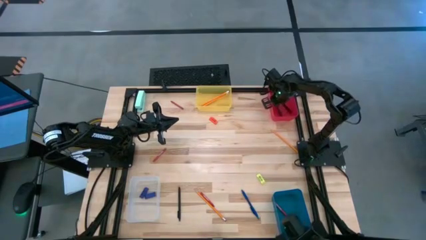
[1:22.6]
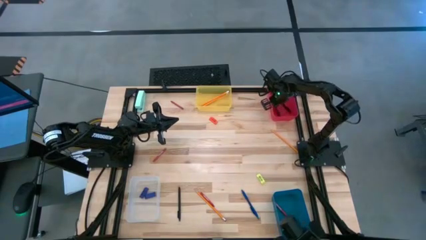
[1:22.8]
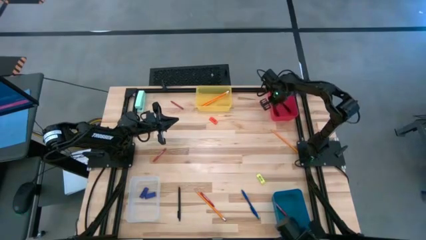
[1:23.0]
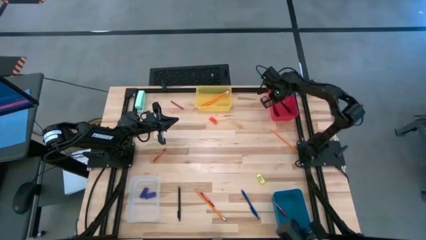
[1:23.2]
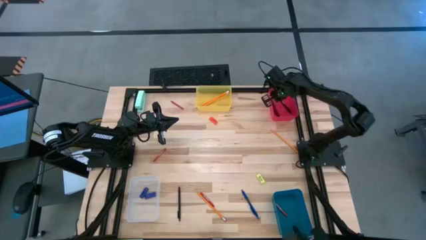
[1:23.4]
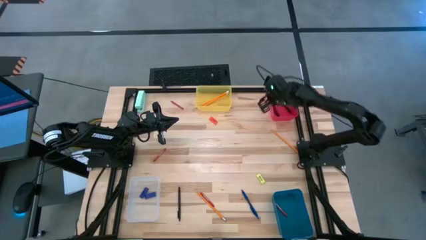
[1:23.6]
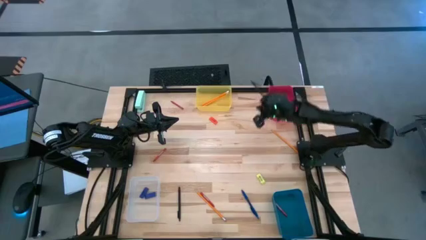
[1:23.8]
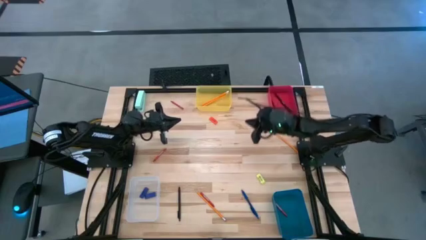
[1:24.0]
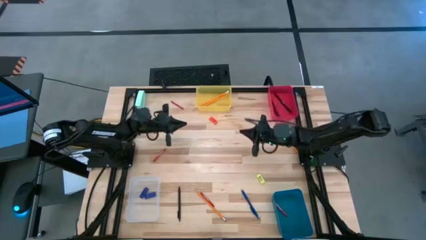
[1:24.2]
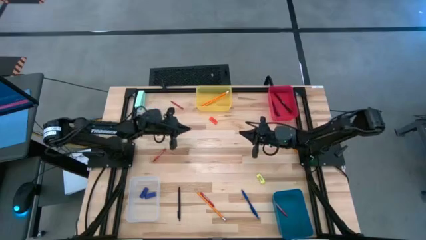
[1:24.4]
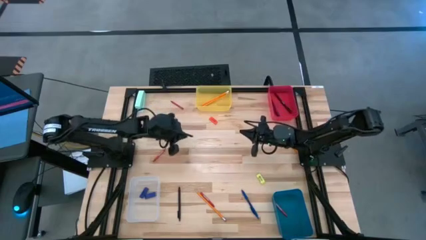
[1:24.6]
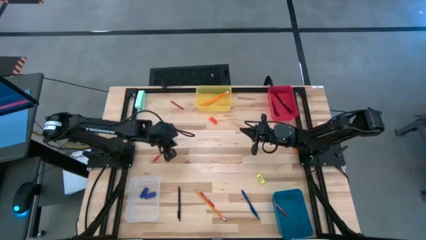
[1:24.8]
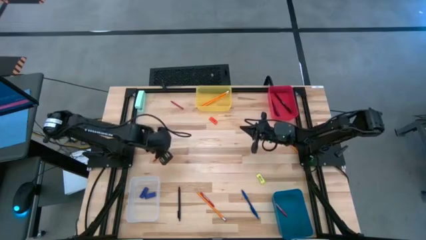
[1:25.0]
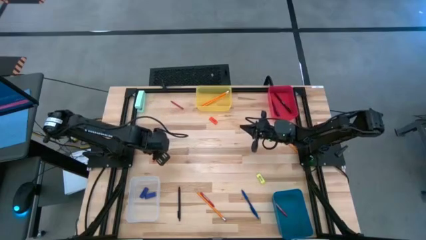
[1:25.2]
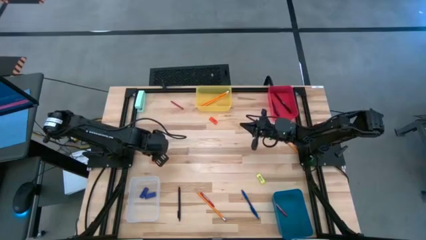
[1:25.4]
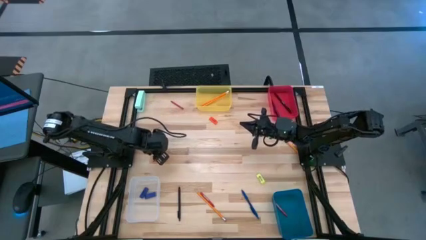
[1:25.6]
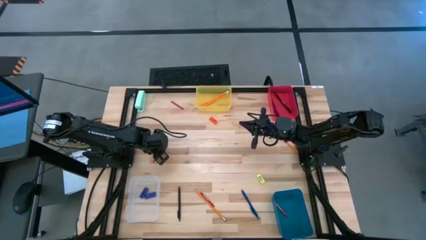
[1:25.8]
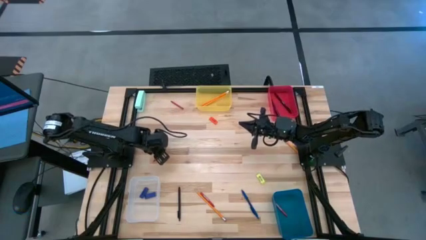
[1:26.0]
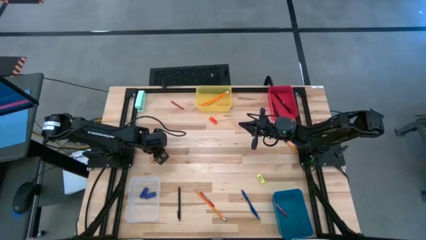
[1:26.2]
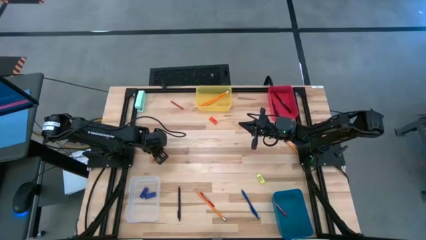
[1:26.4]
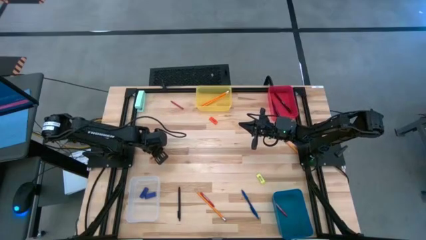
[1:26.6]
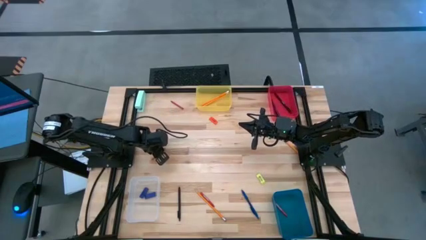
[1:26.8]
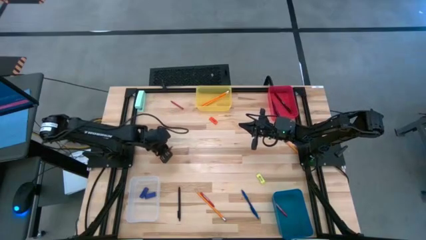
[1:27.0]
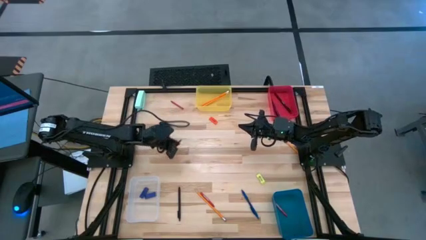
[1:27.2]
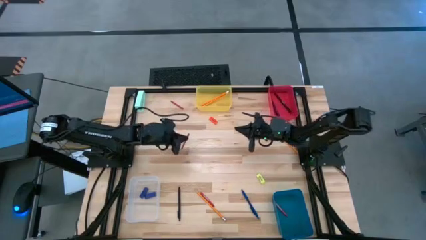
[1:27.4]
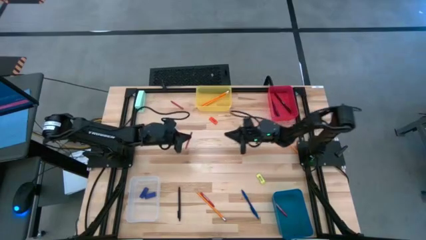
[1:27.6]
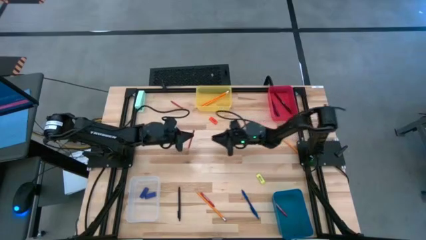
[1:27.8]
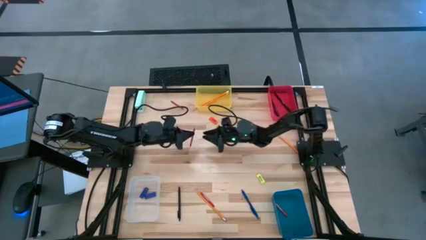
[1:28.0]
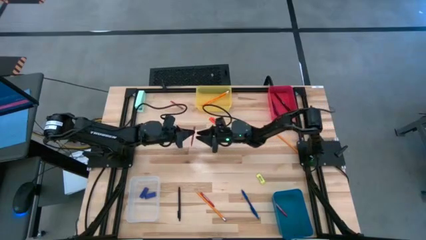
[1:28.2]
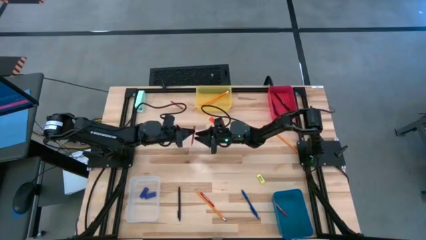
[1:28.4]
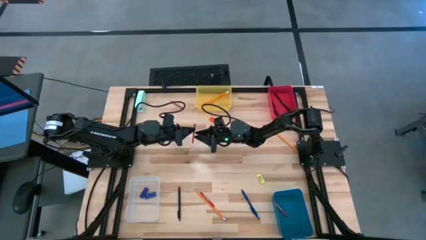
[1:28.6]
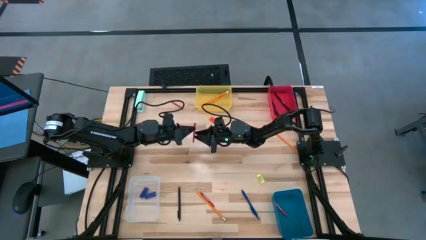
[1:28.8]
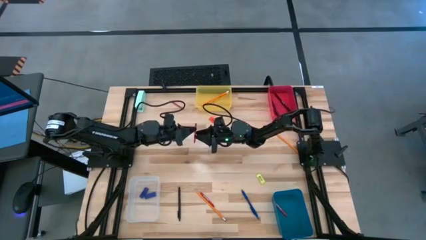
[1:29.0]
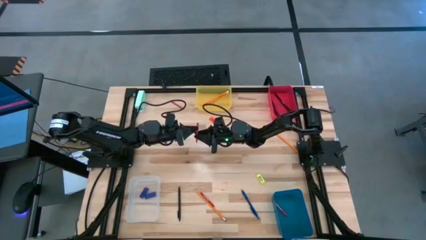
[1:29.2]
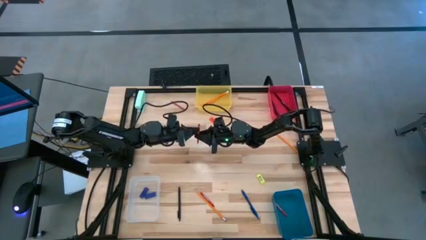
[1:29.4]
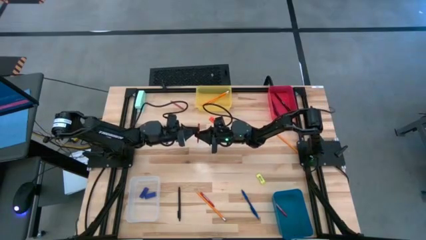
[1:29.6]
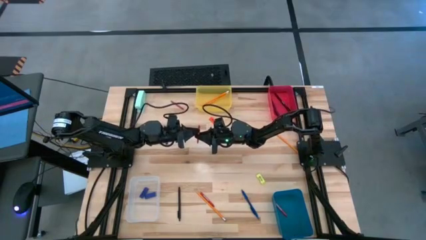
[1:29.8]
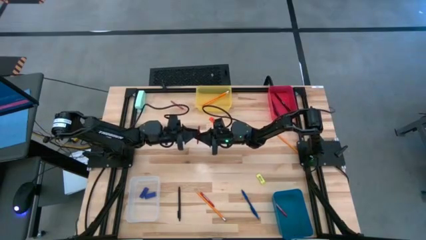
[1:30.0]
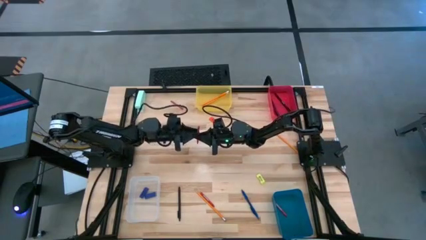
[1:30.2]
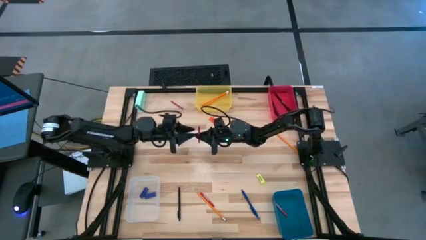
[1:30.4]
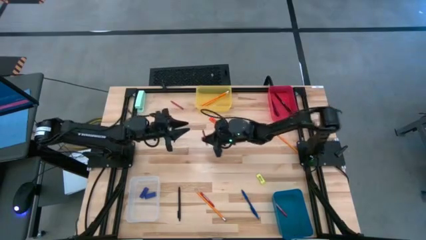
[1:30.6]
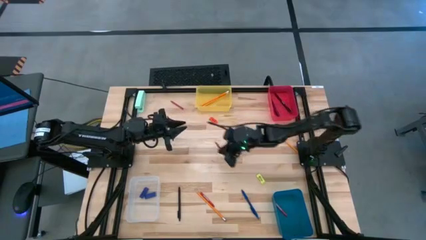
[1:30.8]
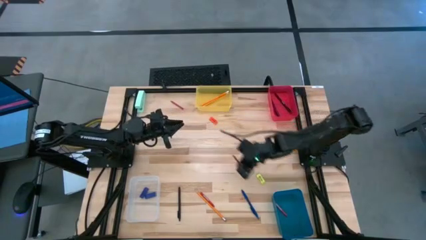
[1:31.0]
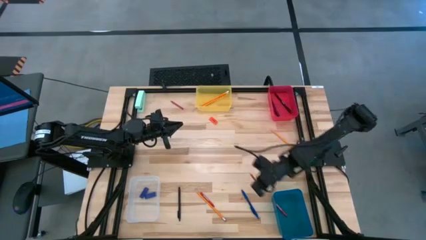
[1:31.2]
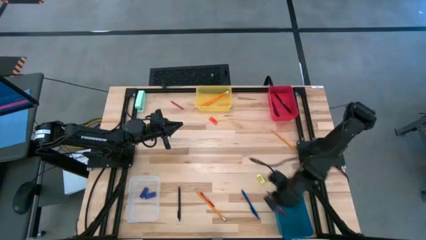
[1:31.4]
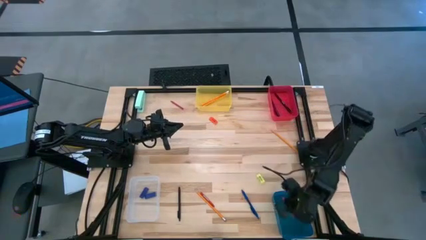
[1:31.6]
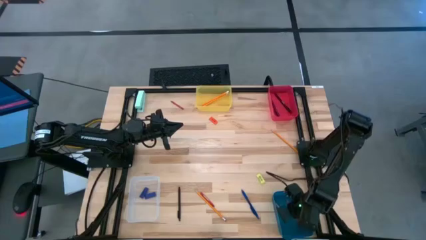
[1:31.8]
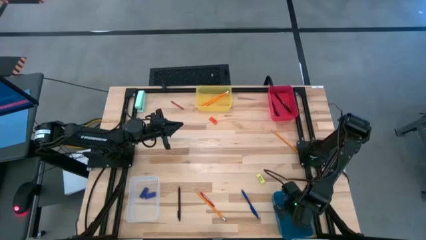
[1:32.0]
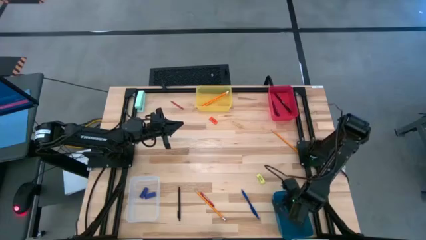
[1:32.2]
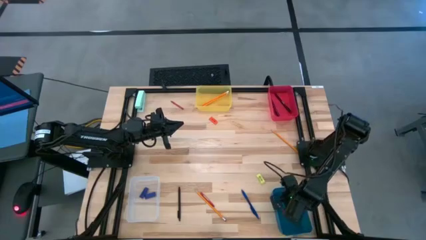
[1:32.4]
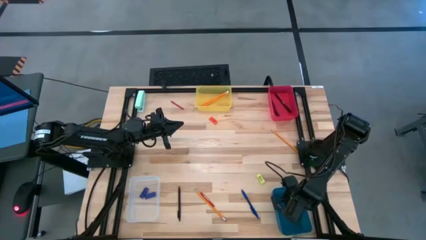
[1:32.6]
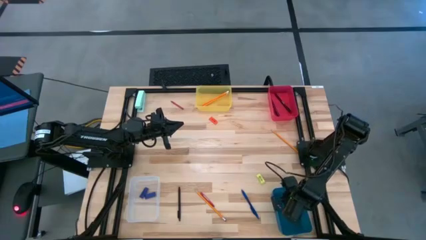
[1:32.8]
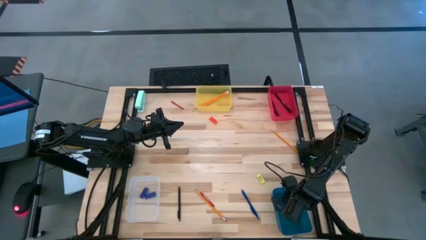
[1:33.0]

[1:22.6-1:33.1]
Task: Sort crayons/erasers/pens/pencils in bins
Put the red crayon into the blue bin

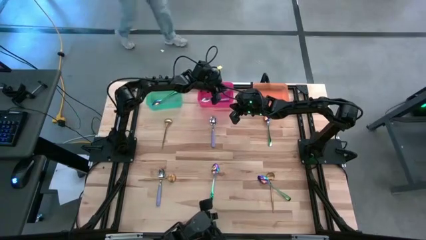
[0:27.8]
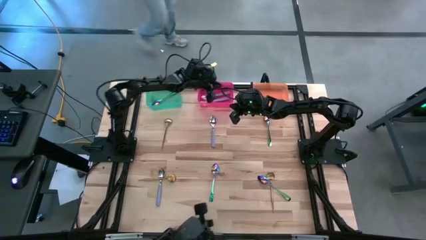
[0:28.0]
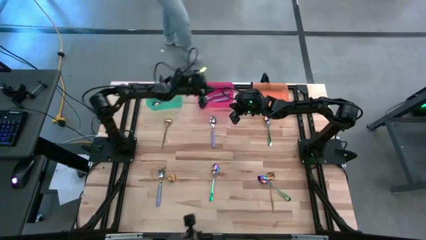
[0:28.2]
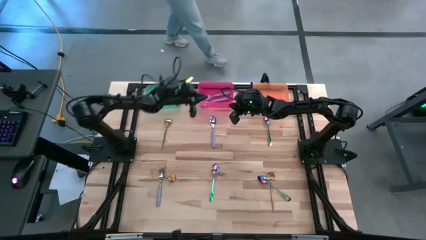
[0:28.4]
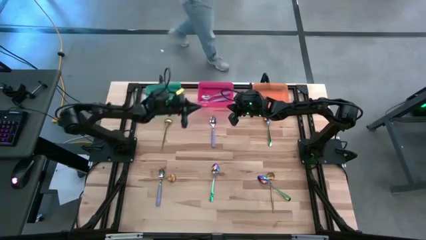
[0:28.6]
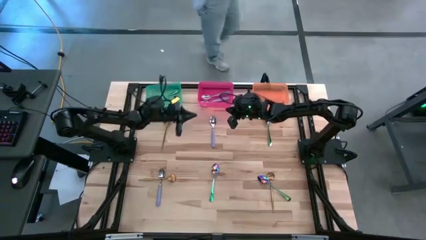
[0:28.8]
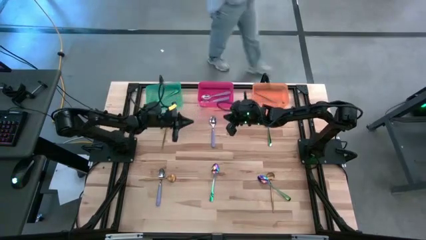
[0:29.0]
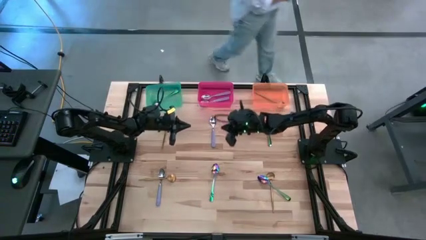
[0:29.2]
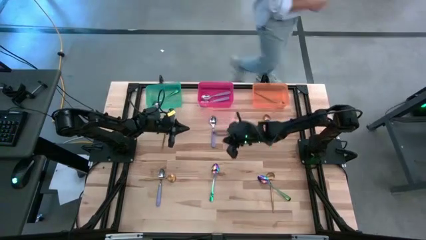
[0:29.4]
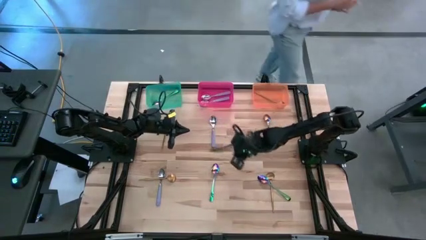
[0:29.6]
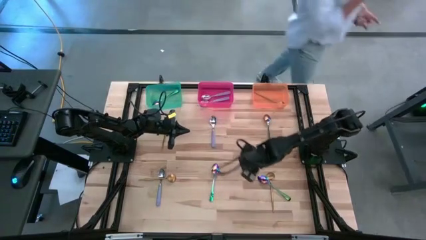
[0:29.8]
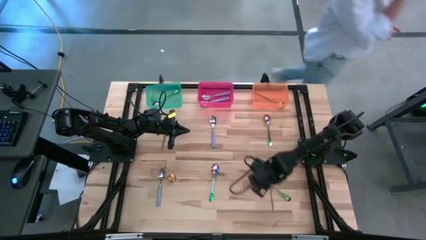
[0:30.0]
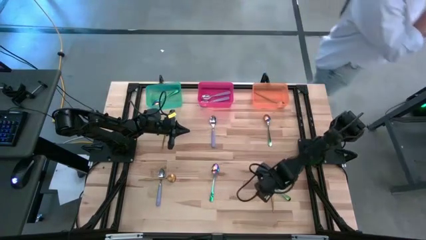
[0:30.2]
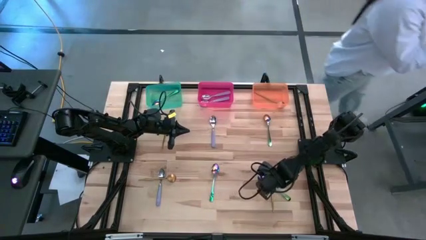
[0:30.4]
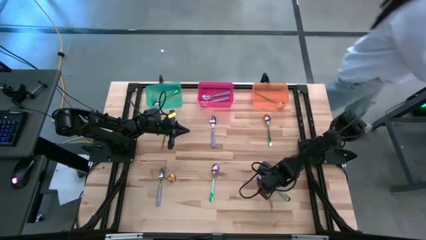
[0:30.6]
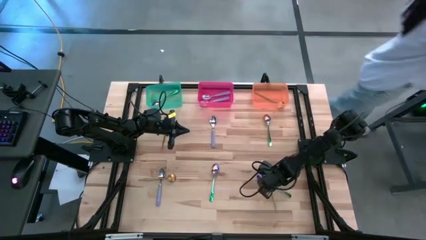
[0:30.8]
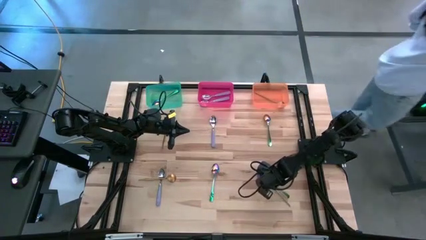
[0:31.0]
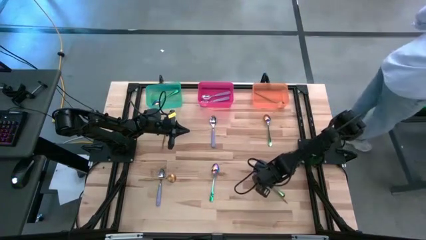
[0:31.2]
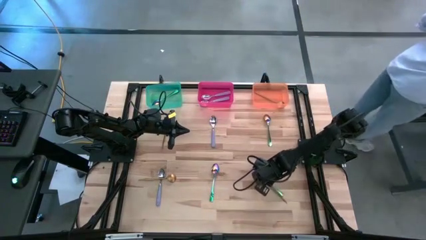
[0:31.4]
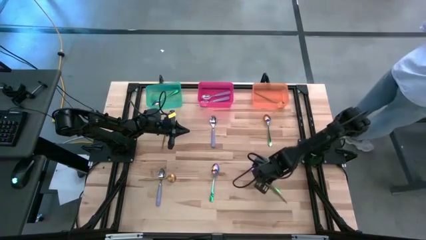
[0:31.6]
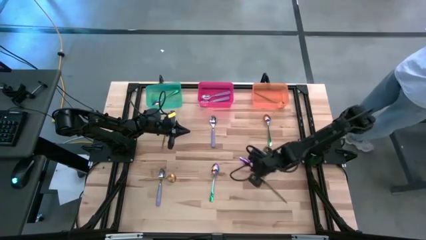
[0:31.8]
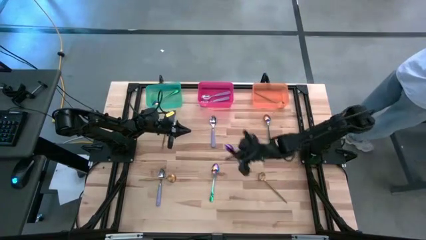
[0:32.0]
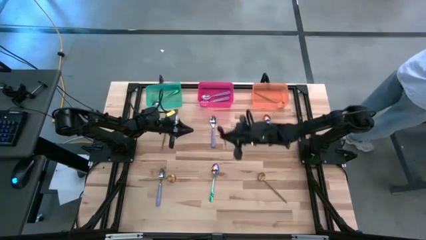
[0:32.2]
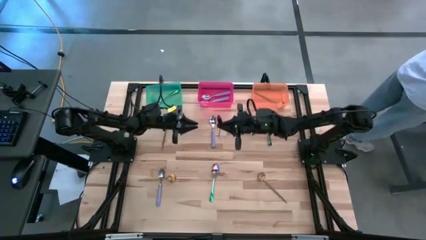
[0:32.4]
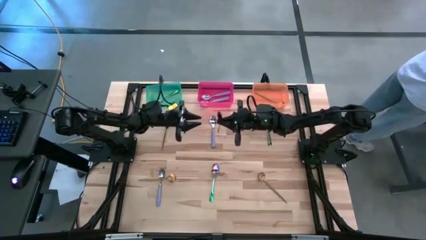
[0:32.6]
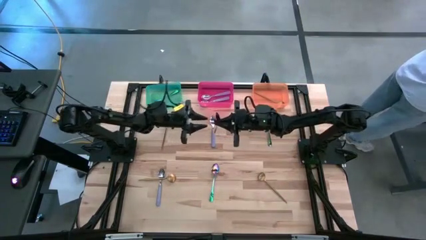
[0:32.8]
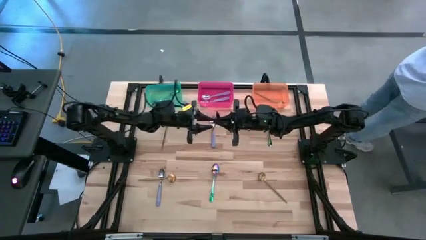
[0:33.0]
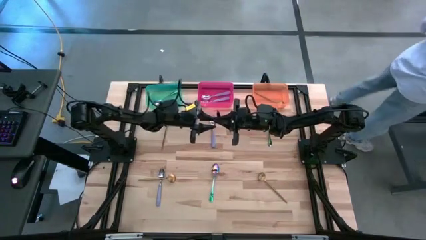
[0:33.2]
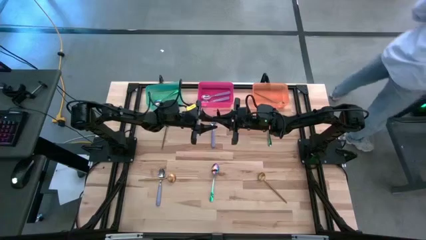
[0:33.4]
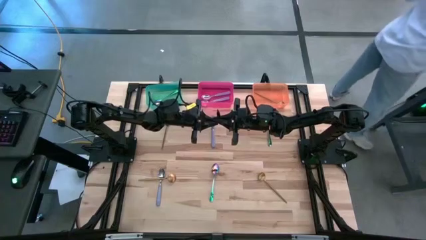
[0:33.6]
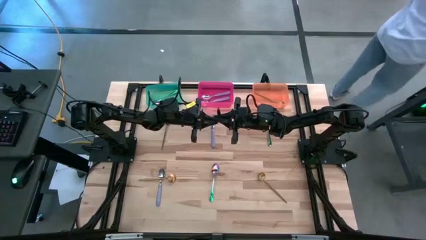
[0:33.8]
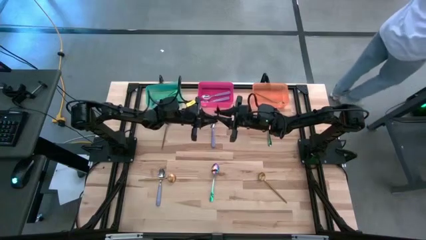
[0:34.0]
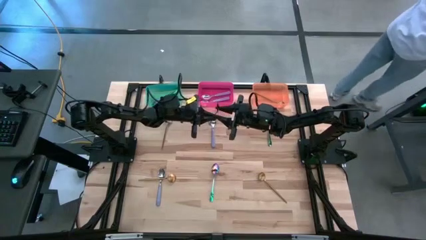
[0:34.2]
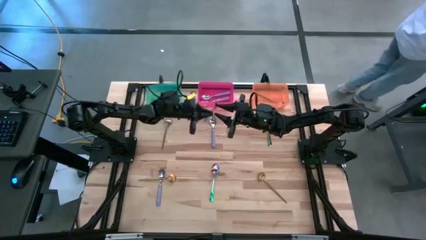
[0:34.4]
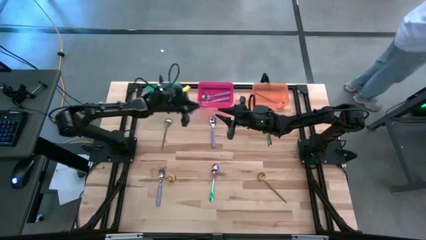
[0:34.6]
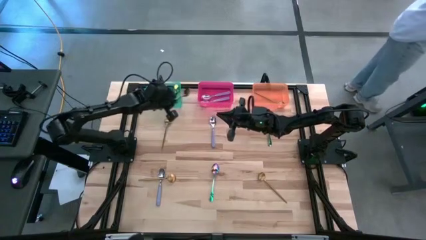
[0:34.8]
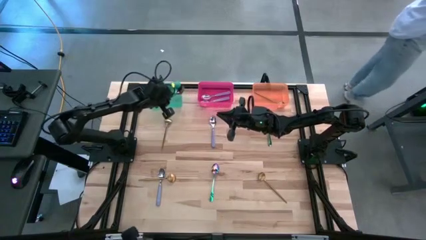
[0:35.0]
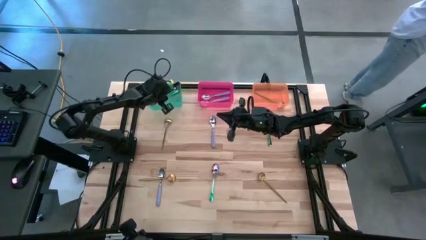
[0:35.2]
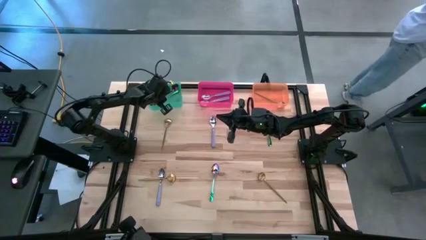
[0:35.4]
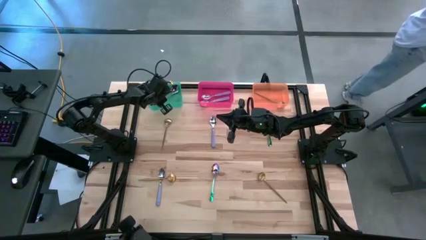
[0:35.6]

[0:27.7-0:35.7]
Task: Sort silverware by color (type)
Put the blue spoon into the green bin
